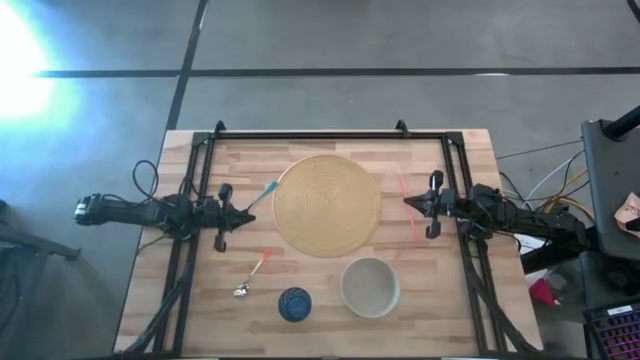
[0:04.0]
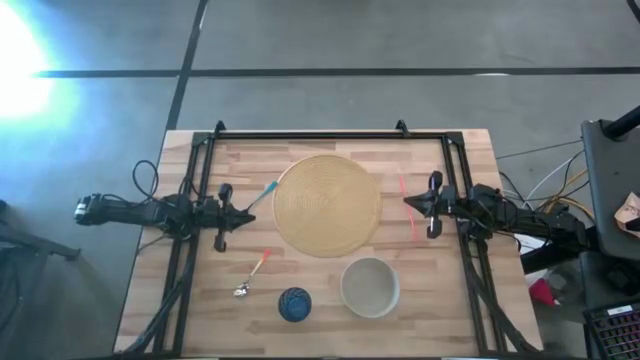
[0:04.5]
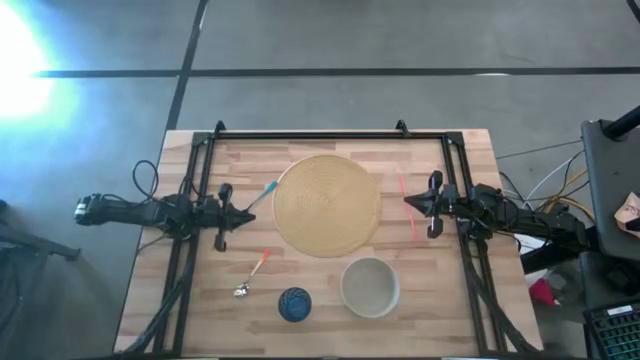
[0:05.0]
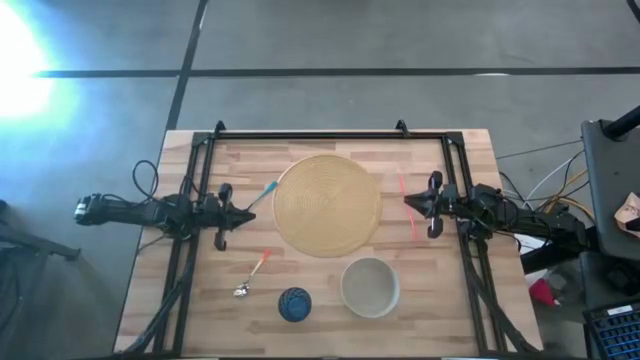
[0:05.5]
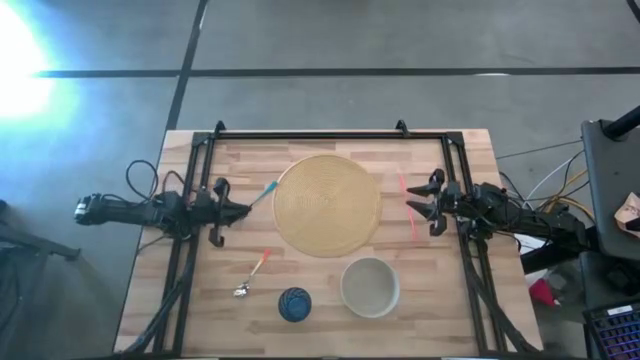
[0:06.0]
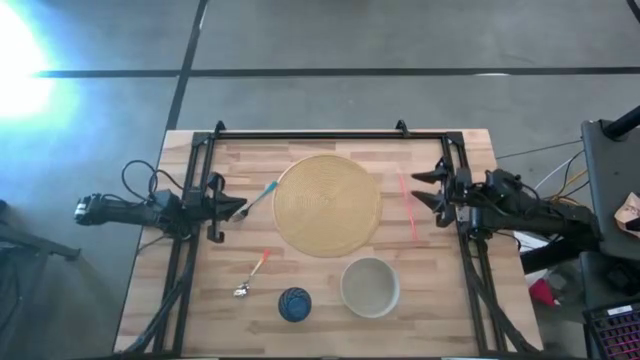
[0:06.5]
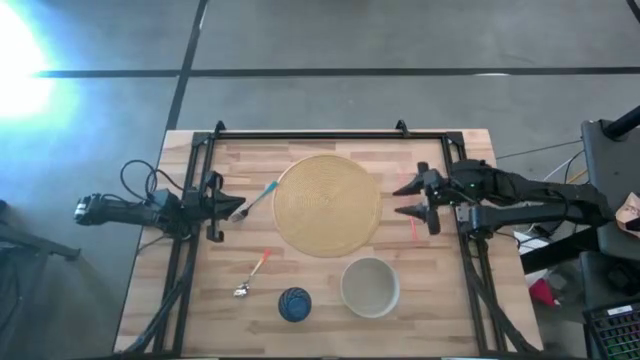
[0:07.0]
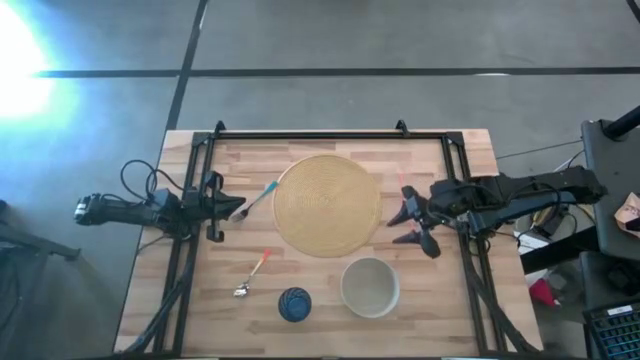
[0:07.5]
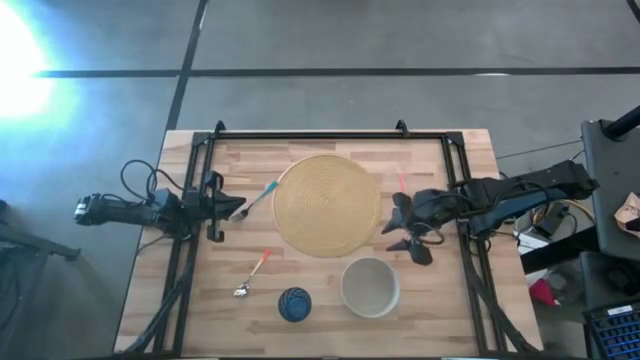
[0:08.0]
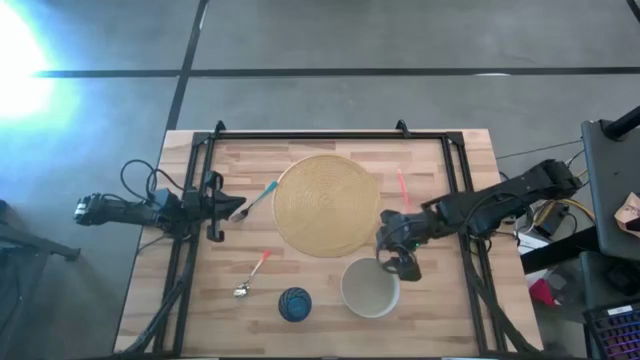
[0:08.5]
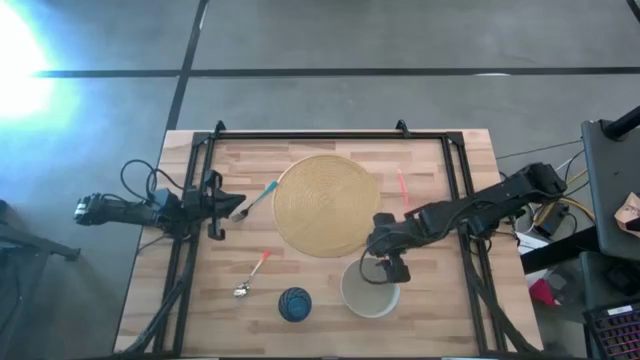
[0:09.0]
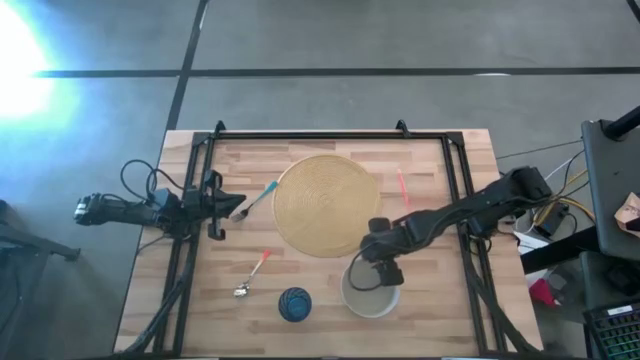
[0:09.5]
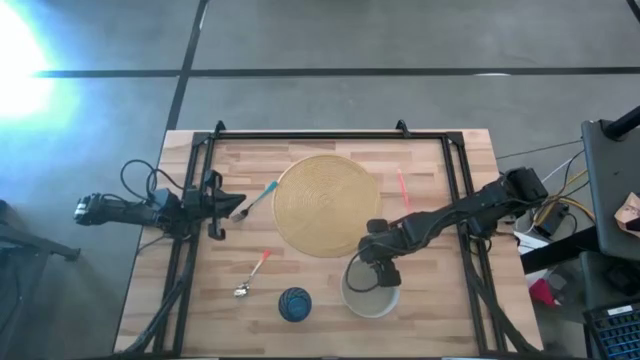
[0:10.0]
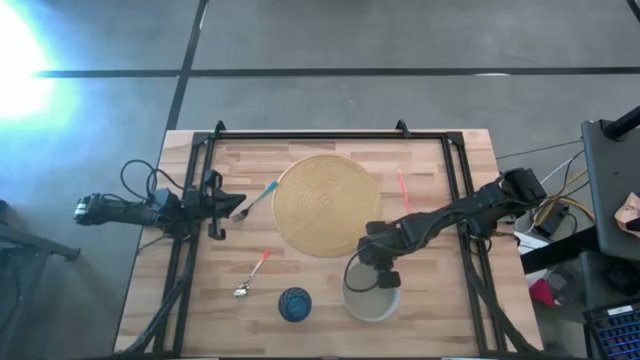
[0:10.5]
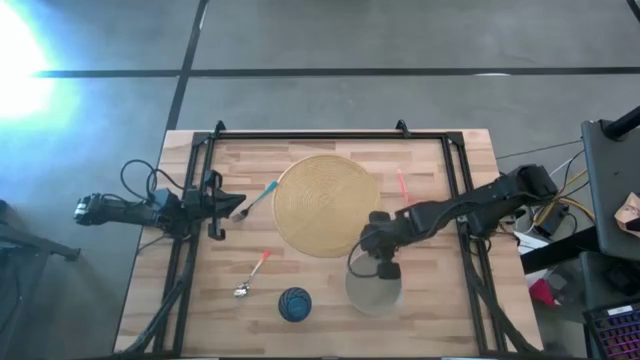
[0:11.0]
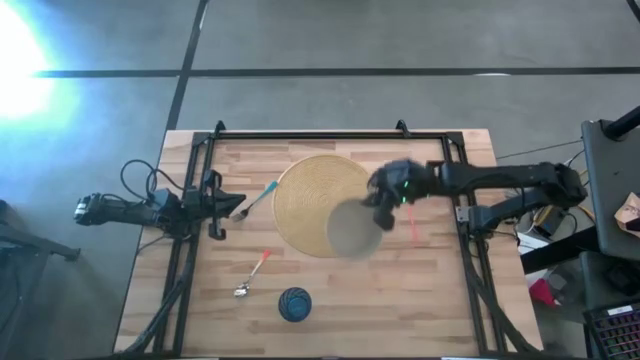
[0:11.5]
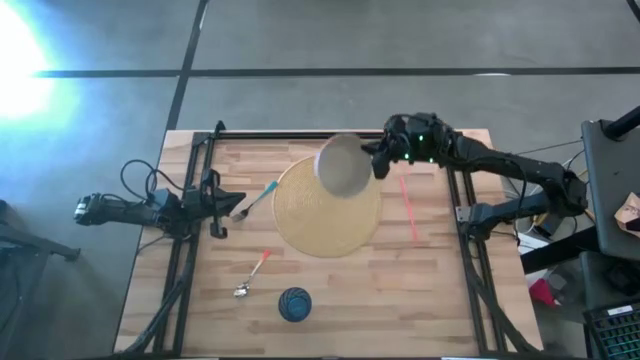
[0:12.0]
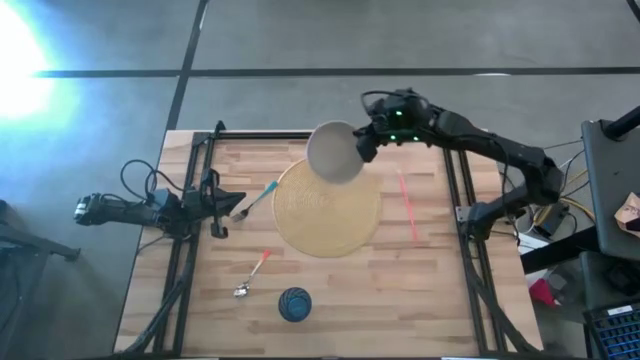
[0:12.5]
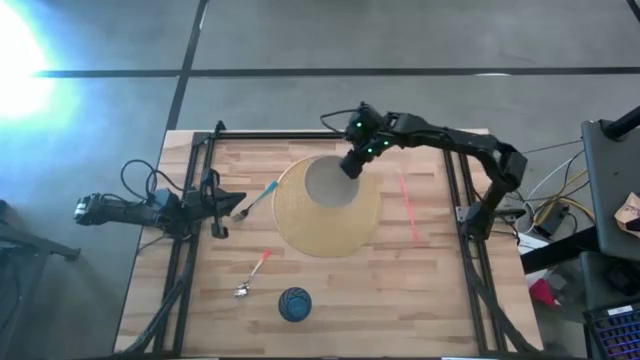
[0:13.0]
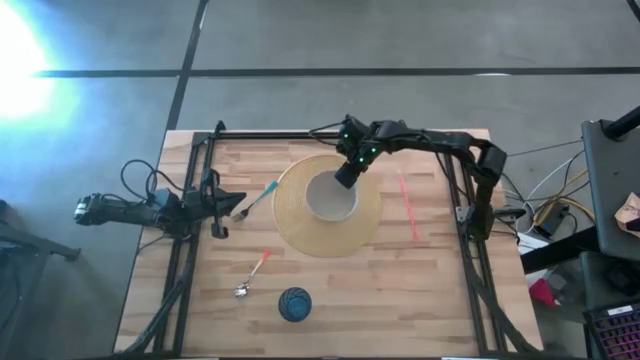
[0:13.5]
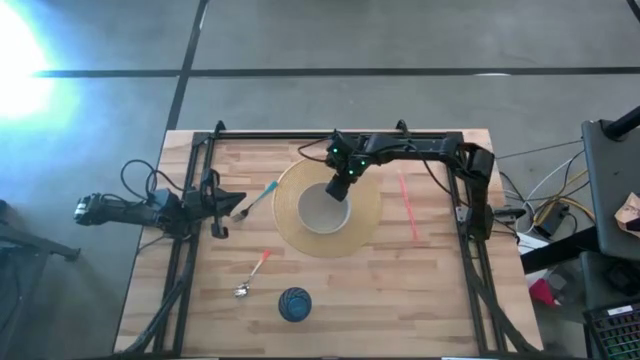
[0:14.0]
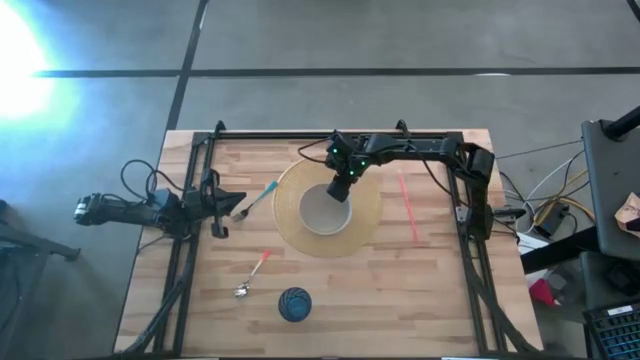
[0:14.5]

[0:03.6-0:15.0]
Task: Pick & Place Utensil
Put the gray bowl on the brown mat

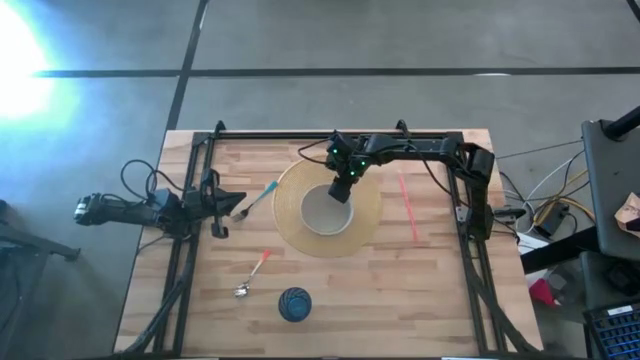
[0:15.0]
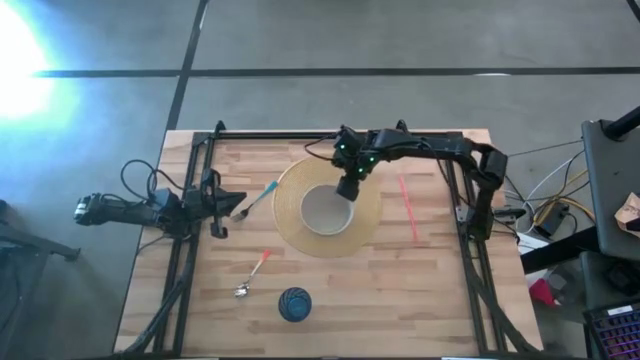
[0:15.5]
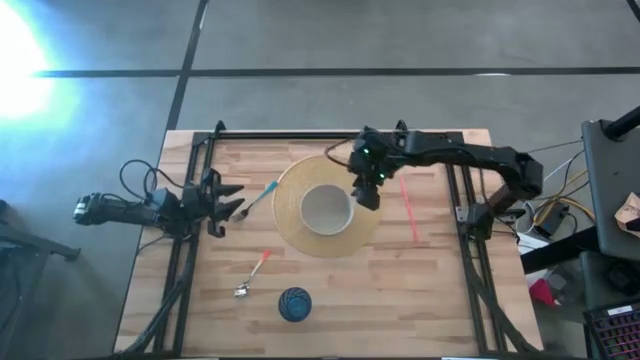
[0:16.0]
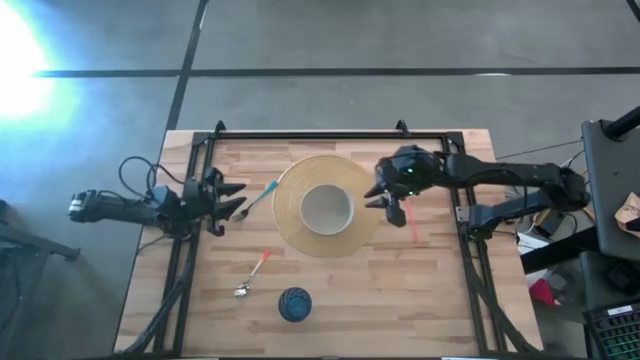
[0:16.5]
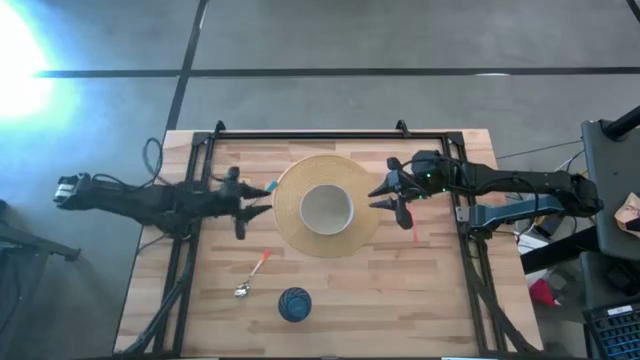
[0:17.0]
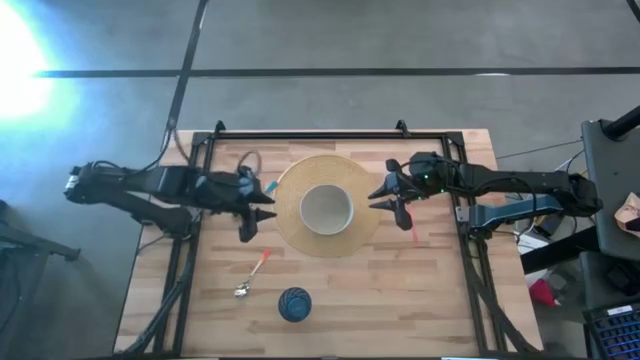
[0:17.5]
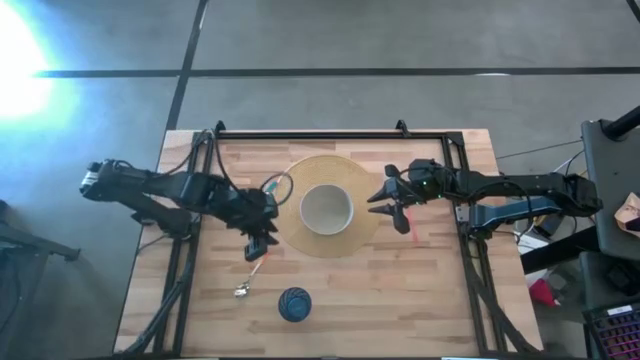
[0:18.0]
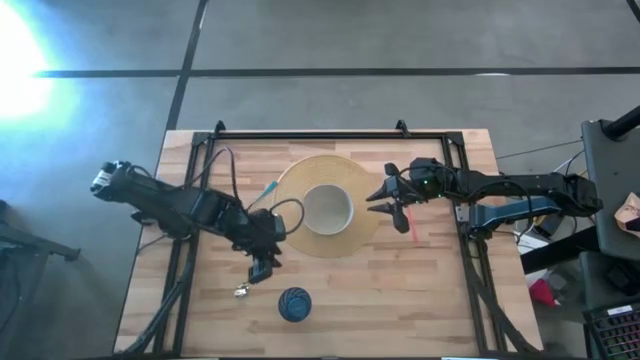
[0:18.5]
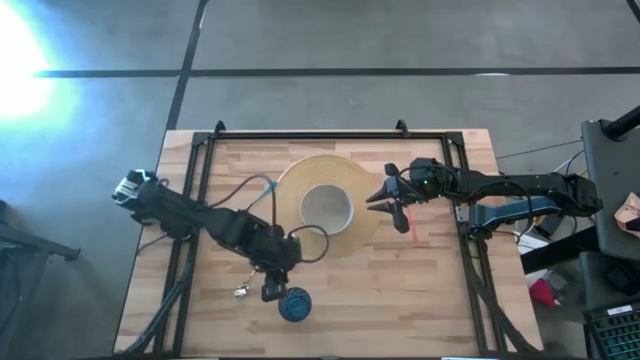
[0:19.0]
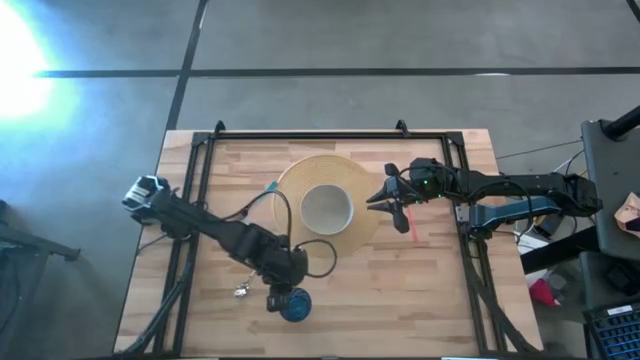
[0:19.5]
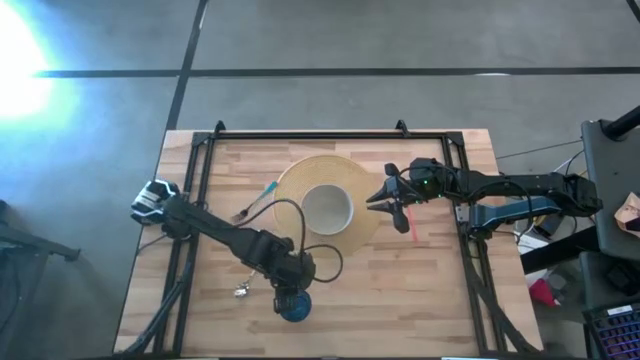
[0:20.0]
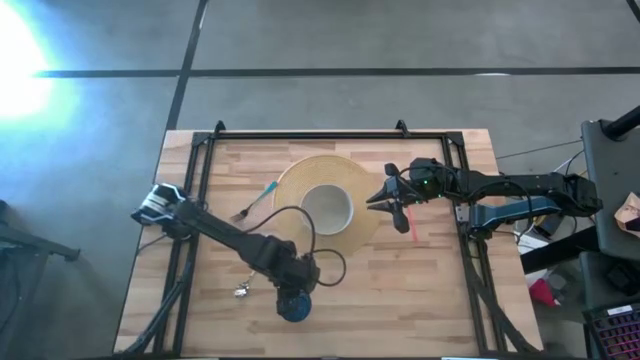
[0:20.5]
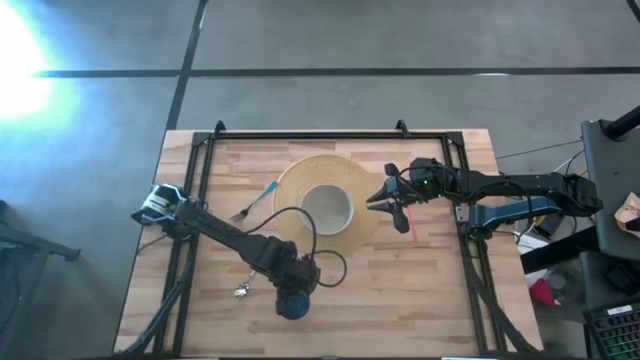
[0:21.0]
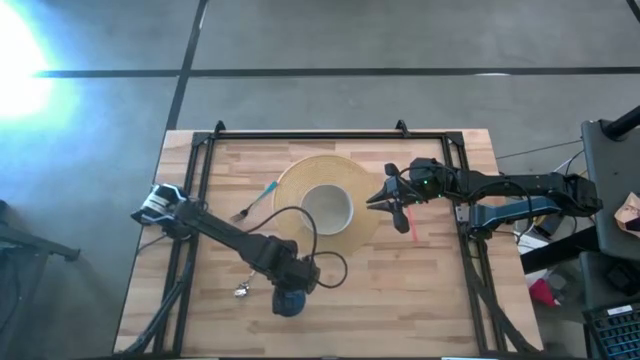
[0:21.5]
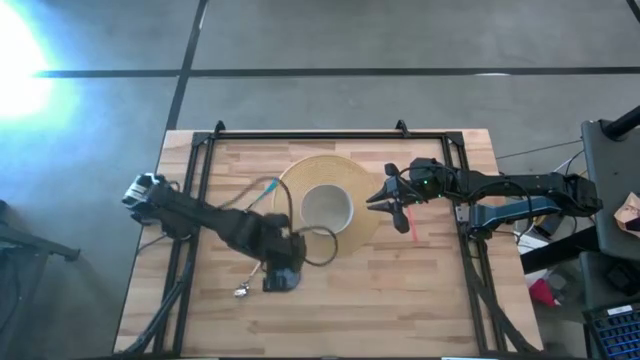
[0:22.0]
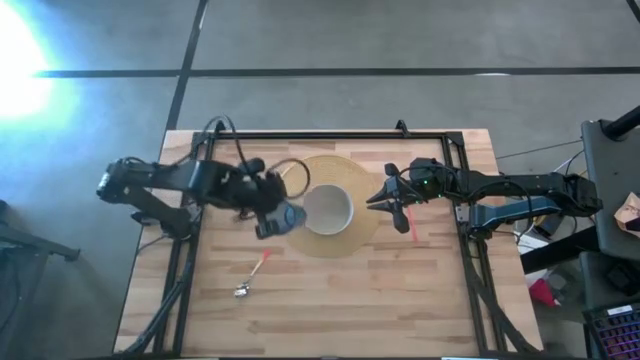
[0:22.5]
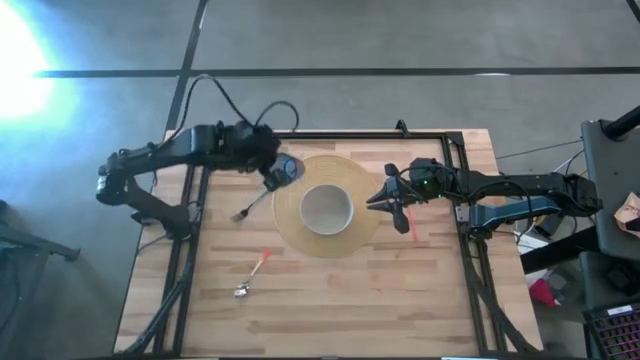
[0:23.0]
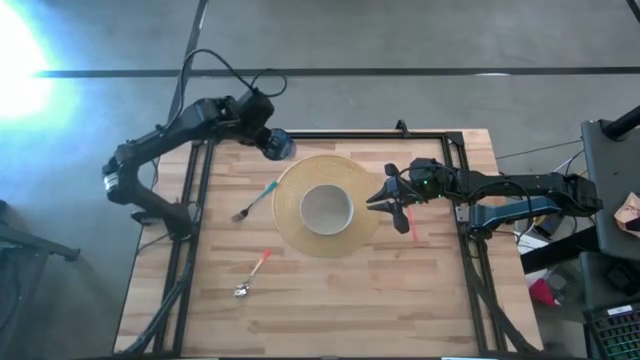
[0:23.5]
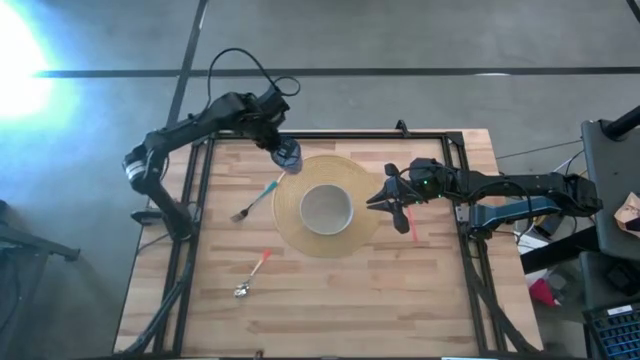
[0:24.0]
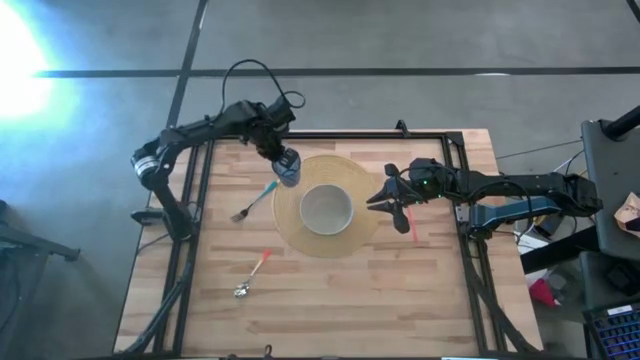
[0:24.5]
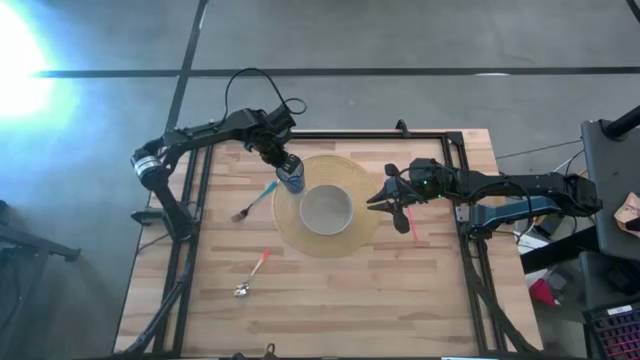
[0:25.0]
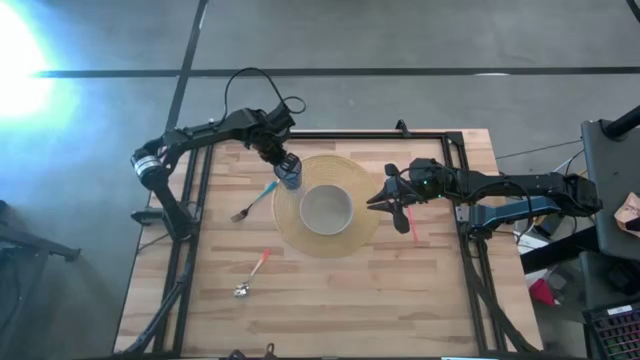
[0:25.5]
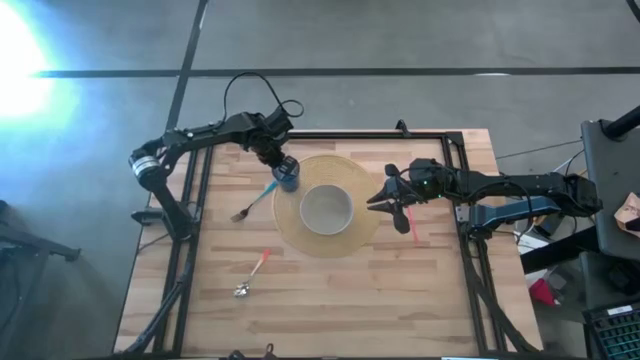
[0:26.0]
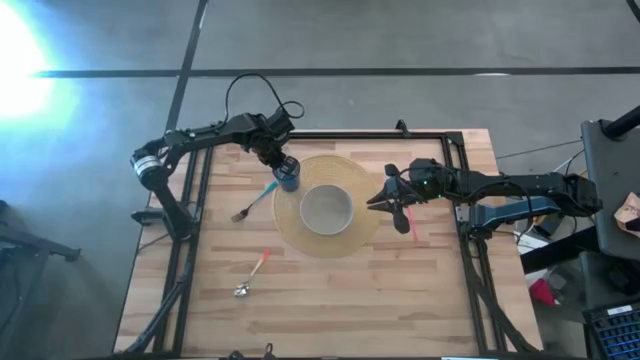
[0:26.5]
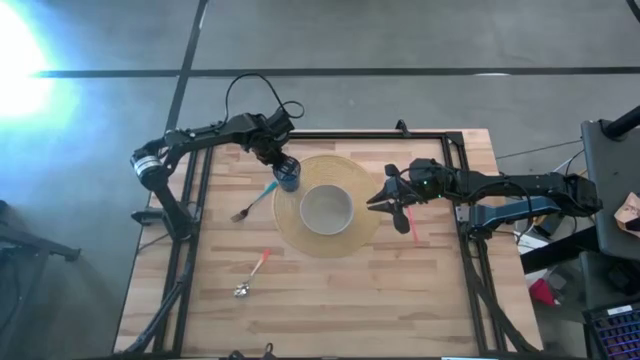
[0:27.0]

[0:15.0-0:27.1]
Put the blue cup on the mat to the top left of the gray bowl
